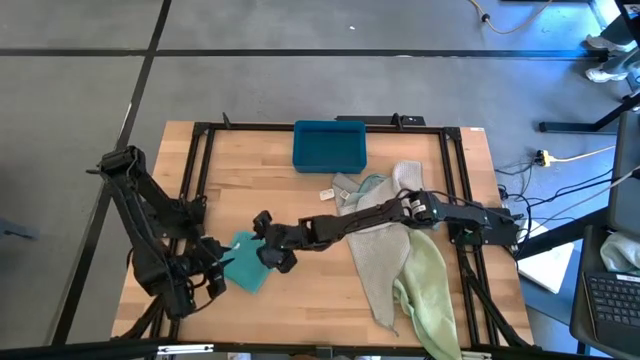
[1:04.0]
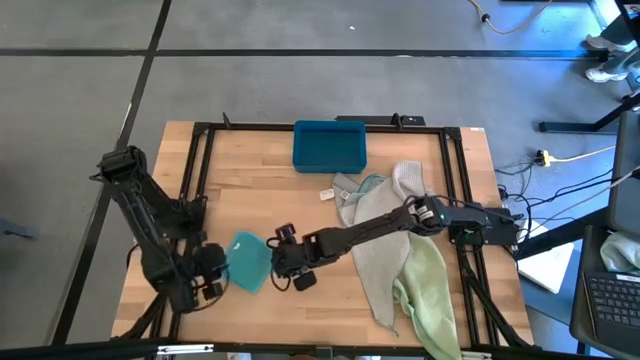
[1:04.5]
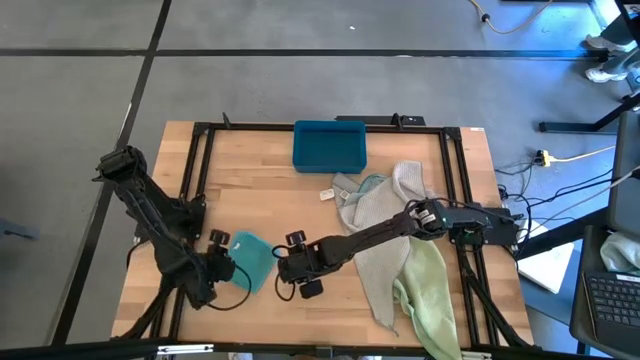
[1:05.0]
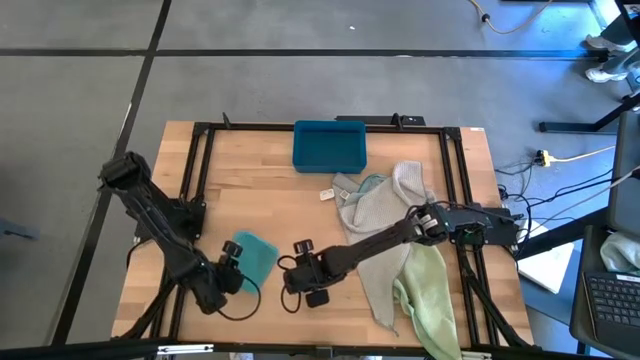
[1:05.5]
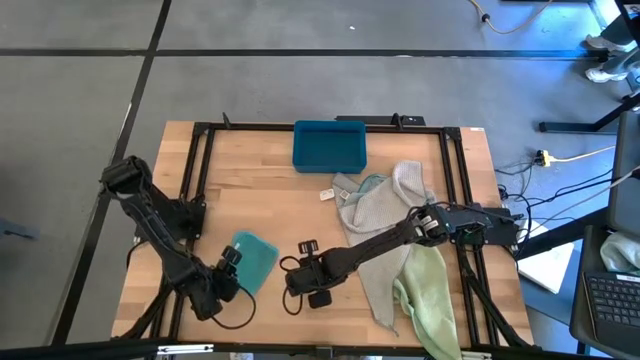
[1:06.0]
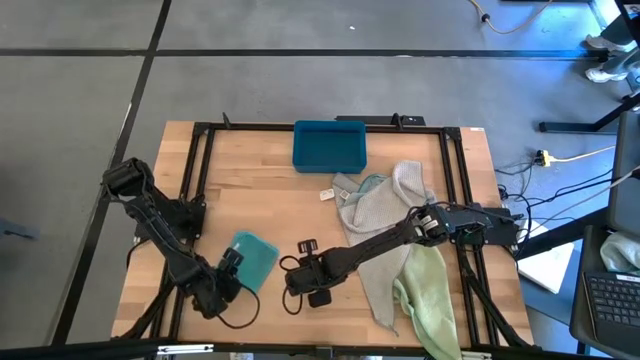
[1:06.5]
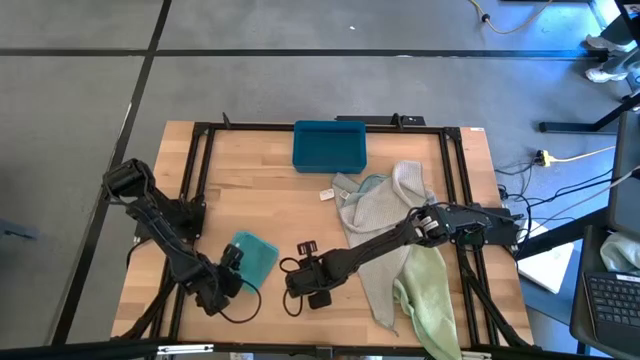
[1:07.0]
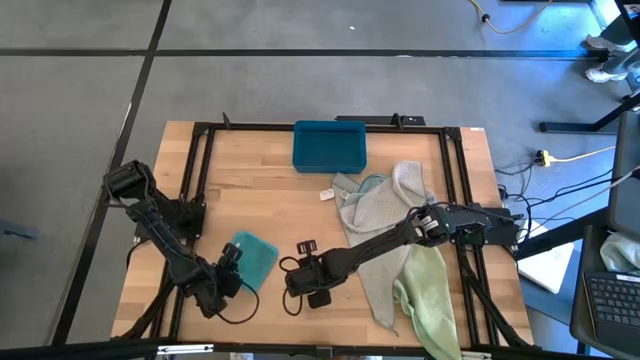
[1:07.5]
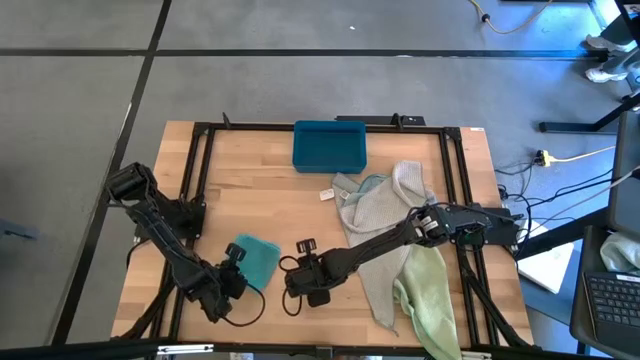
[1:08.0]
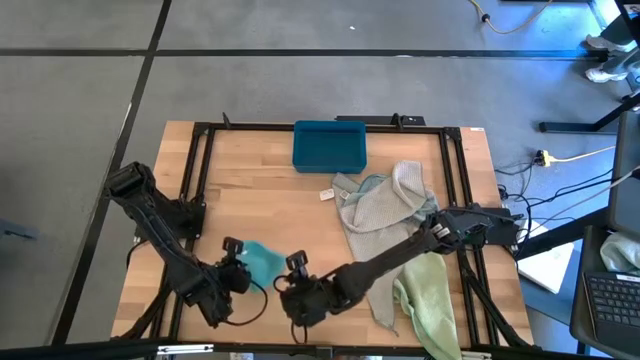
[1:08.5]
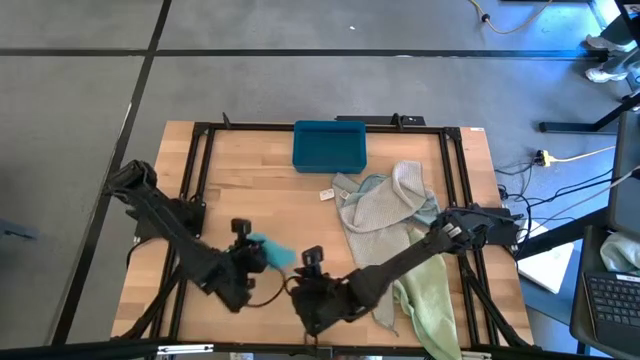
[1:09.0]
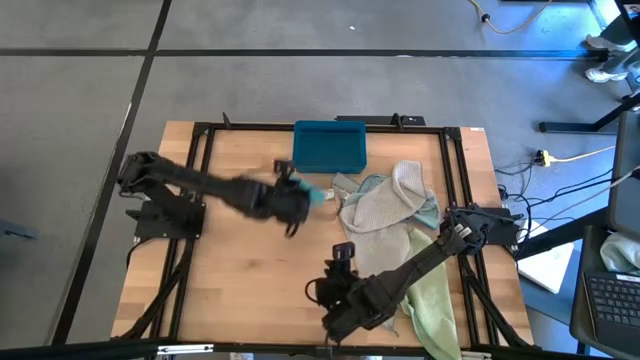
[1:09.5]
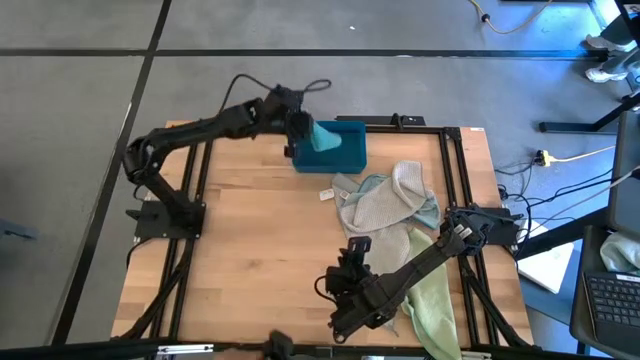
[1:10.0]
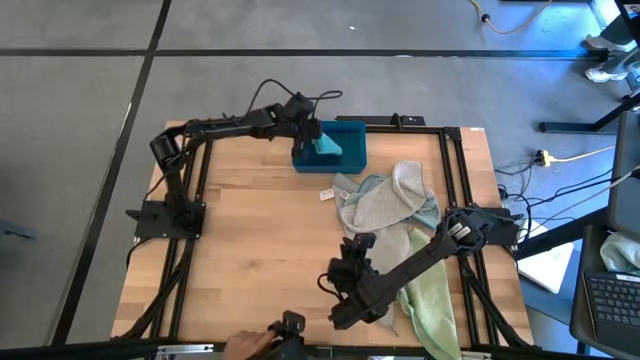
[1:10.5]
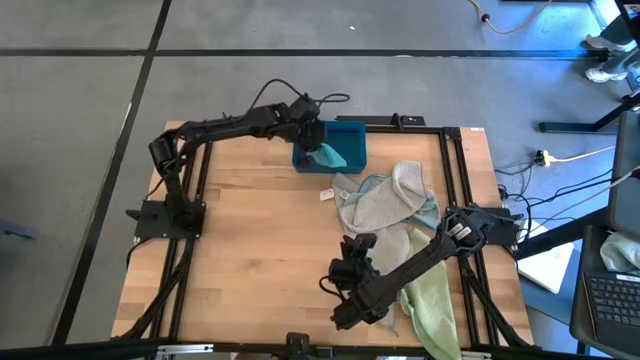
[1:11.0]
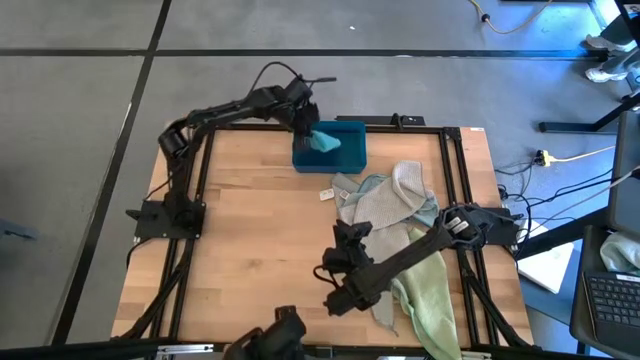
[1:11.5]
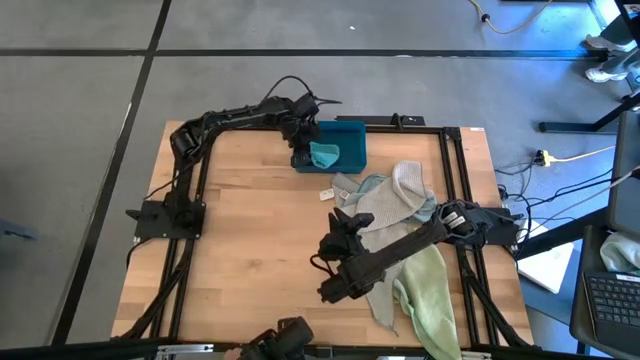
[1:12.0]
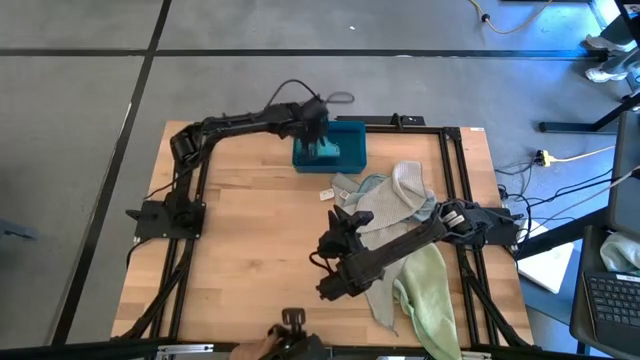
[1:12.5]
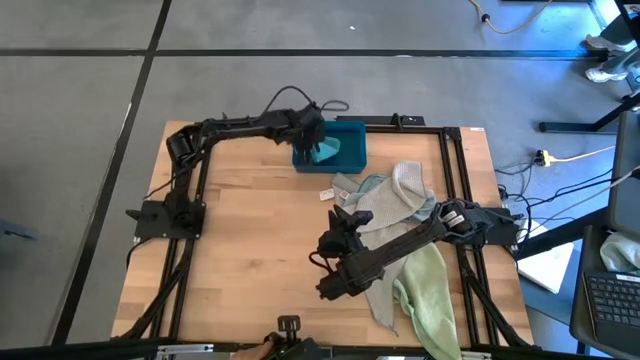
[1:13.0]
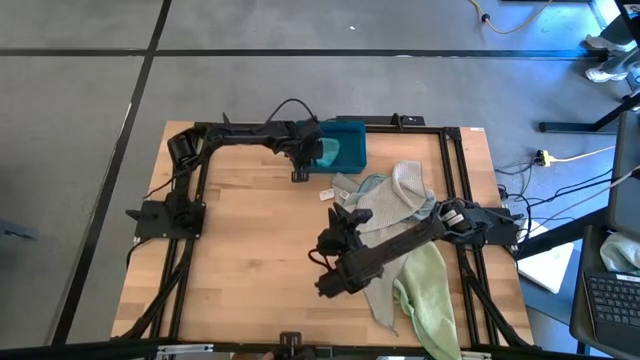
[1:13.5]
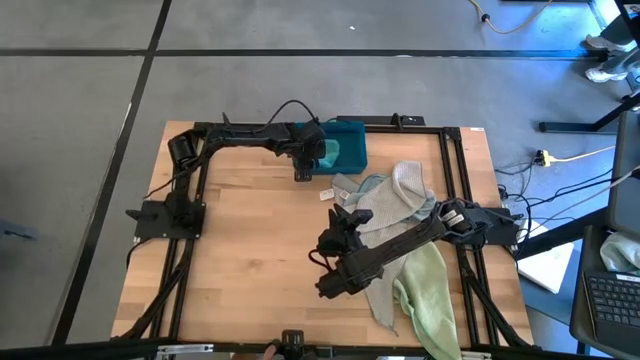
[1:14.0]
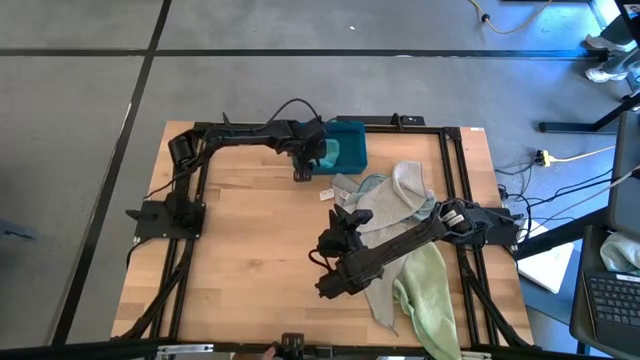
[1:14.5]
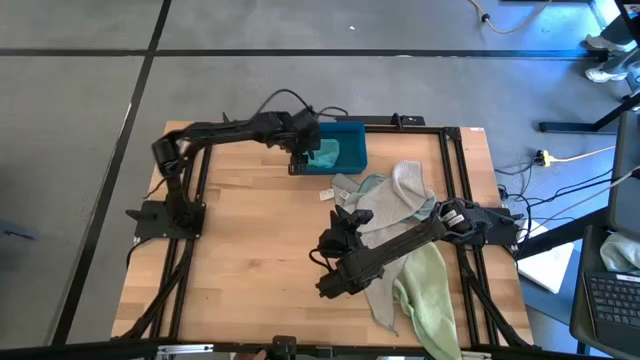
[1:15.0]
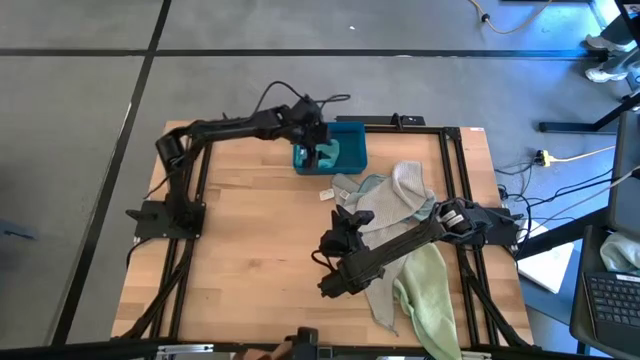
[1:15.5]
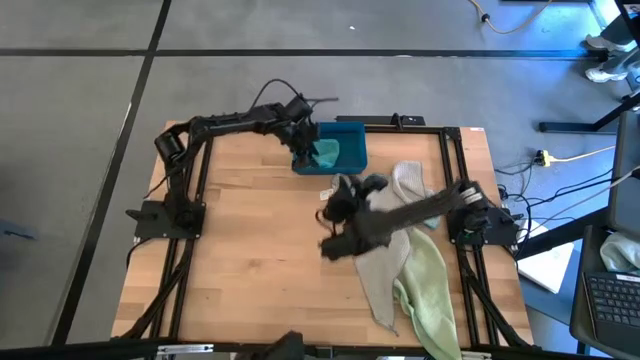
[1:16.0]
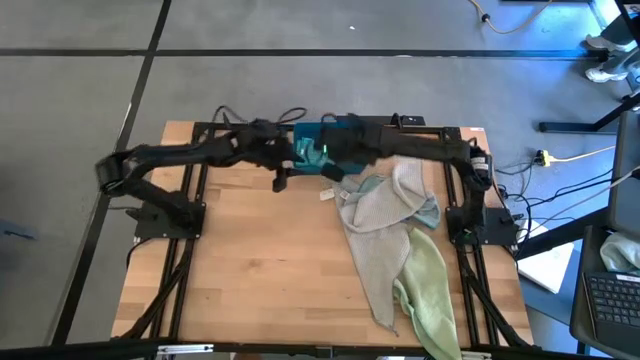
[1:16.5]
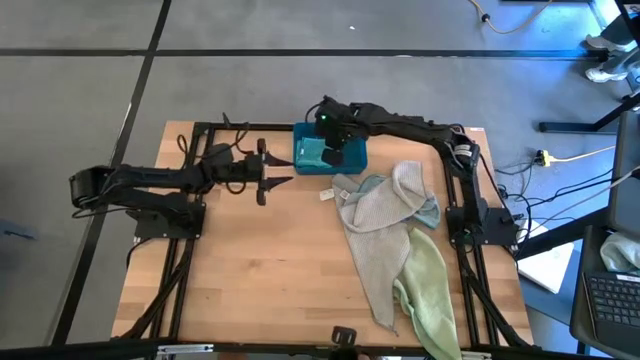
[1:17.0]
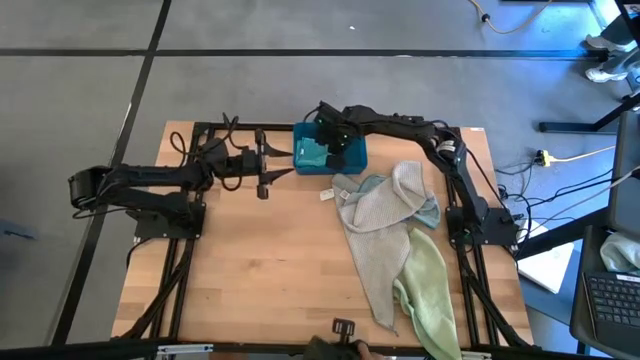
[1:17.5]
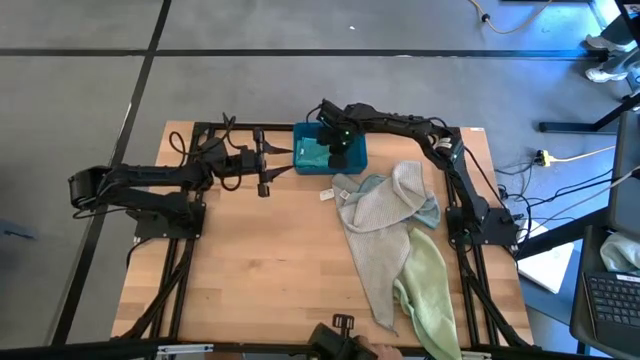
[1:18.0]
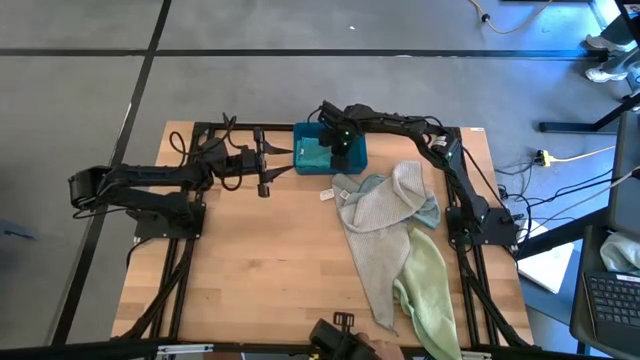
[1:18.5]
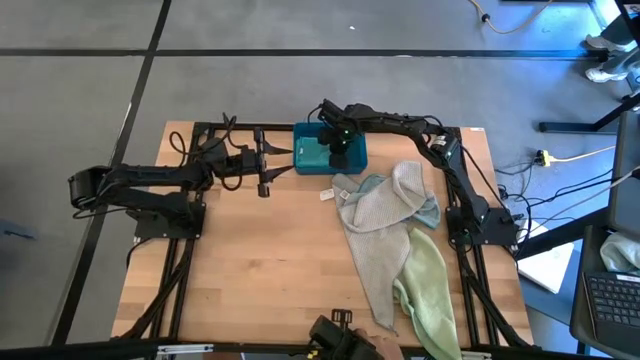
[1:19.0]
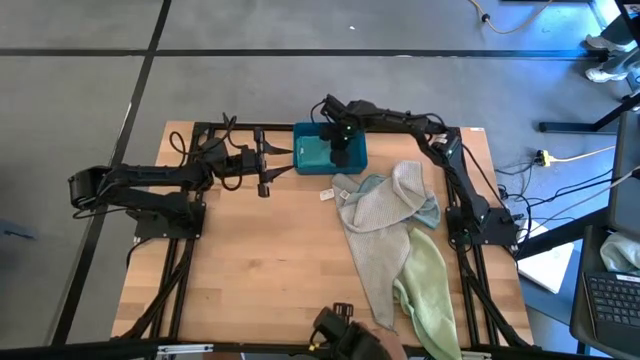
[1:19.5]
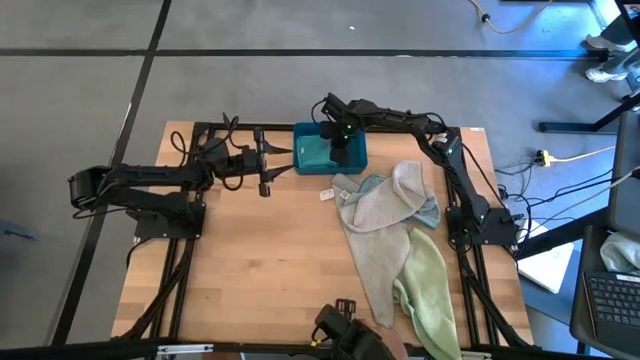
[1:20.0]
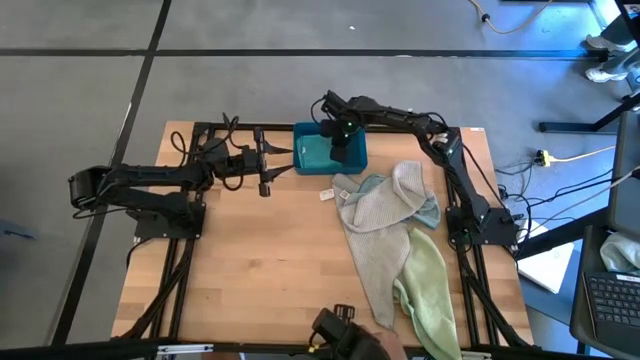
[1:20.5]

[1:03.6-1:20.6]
Task: Fold microfiber towels
Put the folded blue towel into the blue bin

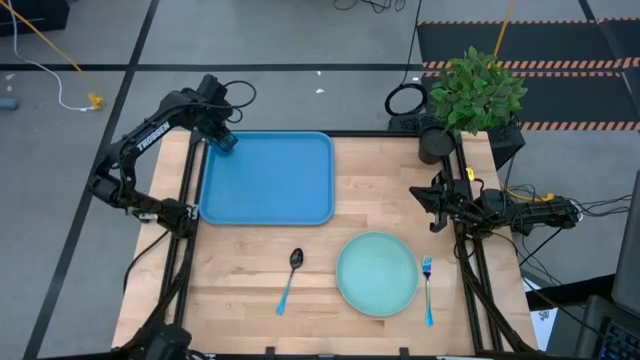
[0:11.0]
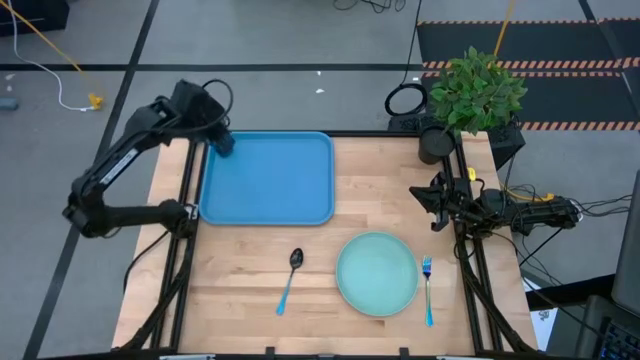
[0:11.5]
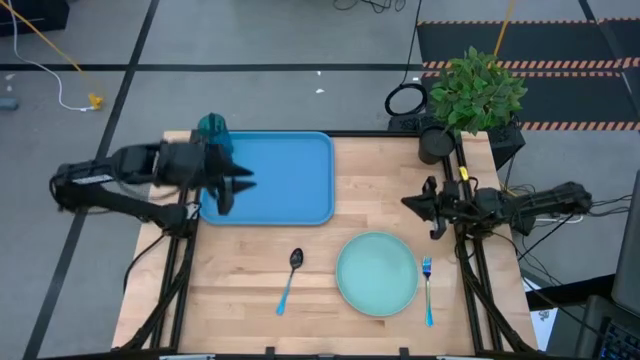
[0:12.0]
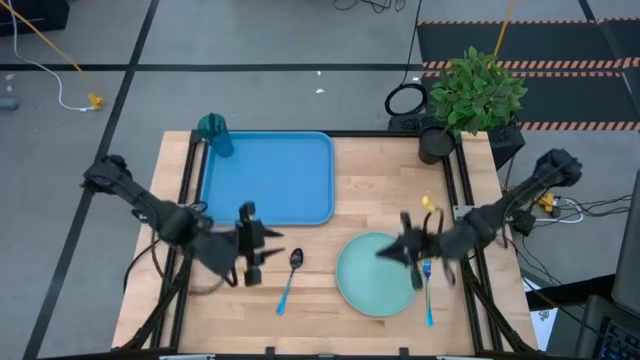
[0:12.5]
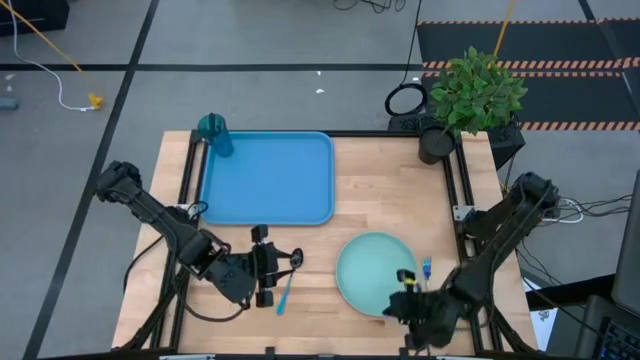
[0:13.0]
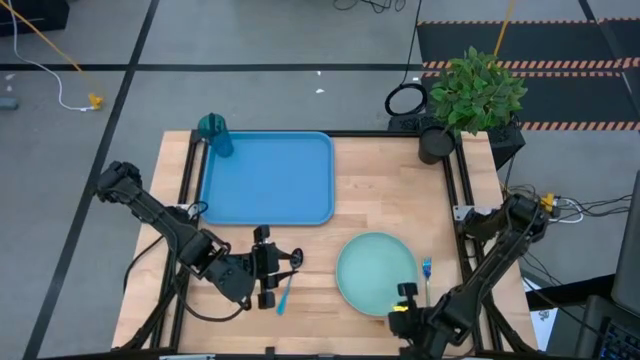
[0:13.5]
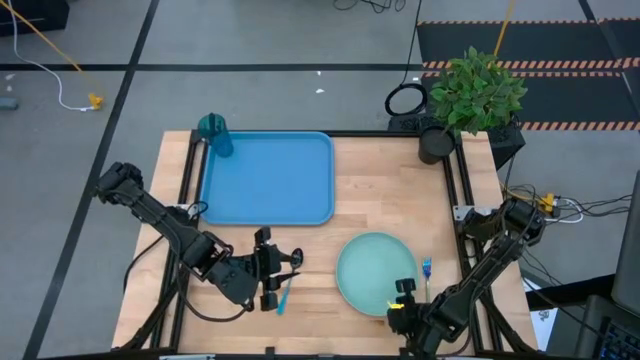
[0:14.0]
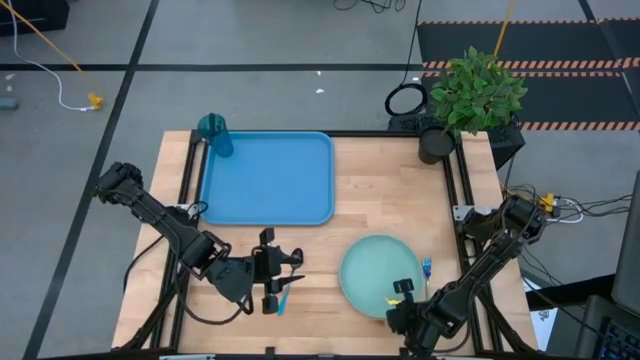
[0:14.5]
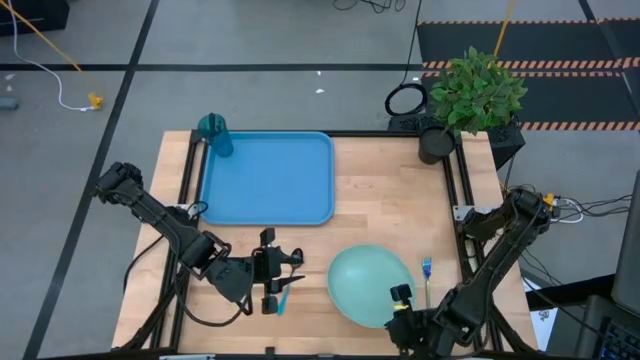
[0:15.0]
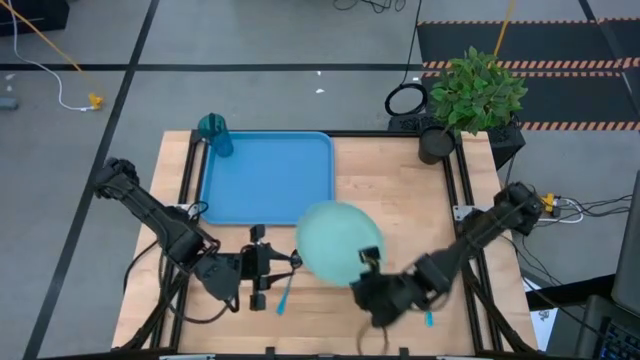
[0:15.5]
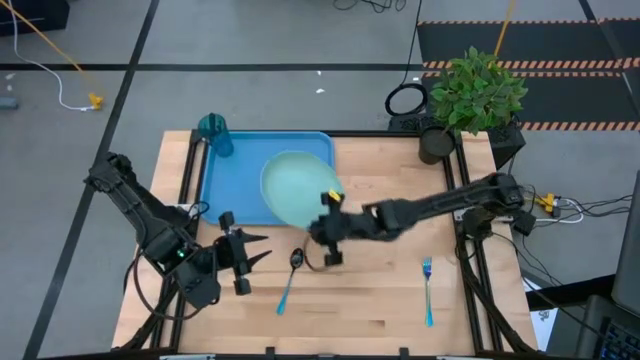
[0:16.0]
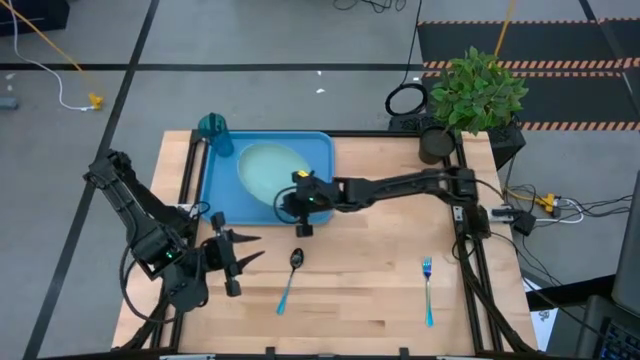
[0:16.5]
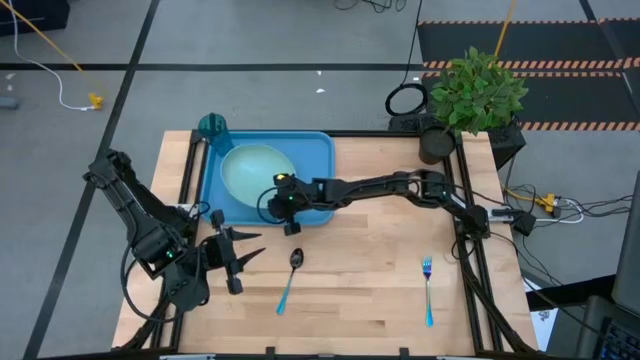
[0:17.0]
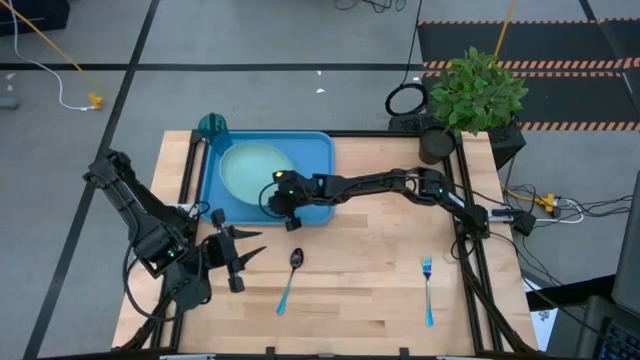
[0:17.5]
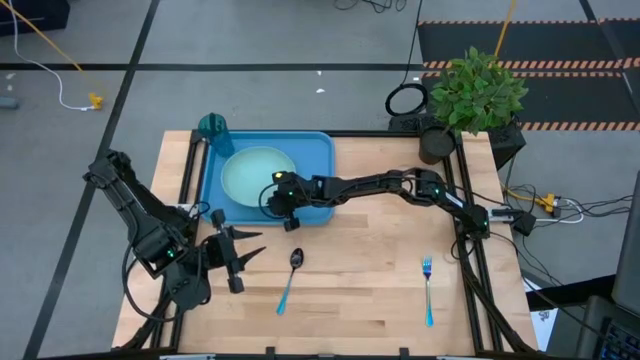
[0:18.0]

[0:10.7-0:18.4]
Task: Pick and place plate/cup/fork/spoon on tray
Put the green plate on the blue tray
